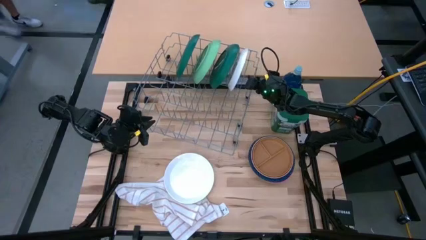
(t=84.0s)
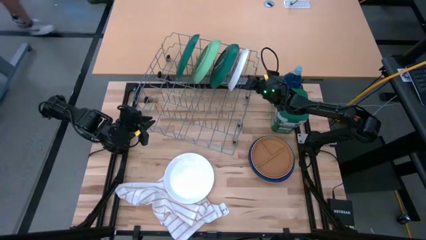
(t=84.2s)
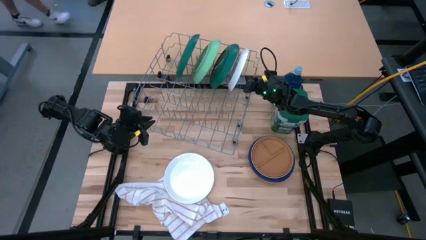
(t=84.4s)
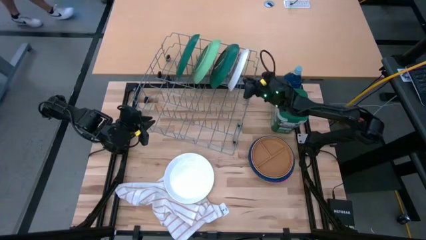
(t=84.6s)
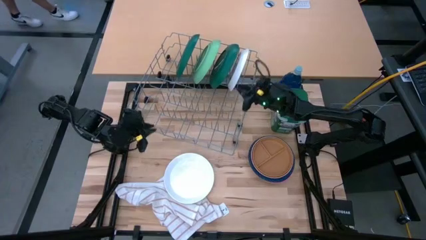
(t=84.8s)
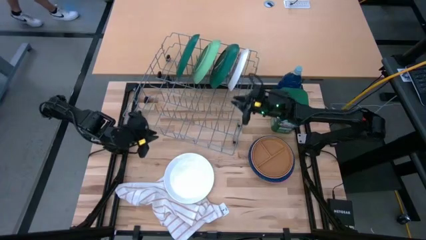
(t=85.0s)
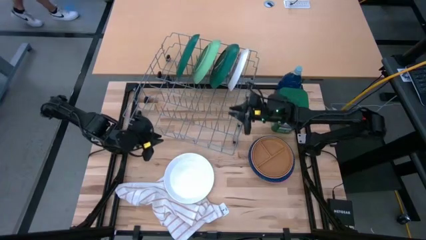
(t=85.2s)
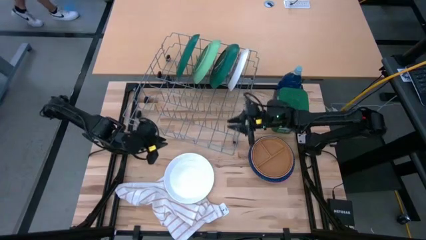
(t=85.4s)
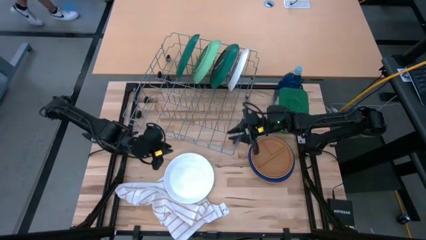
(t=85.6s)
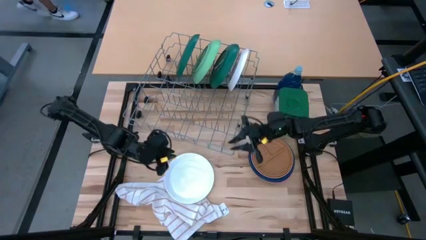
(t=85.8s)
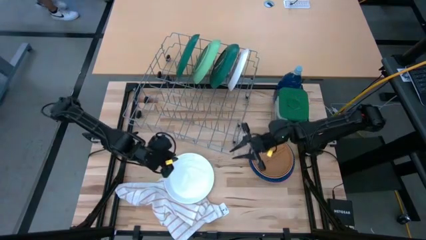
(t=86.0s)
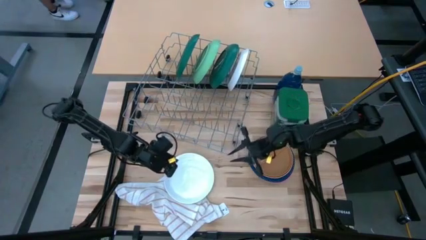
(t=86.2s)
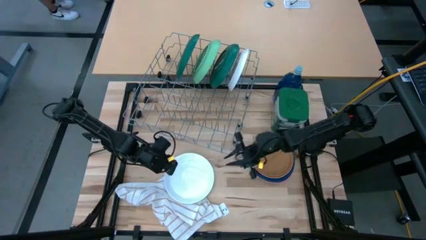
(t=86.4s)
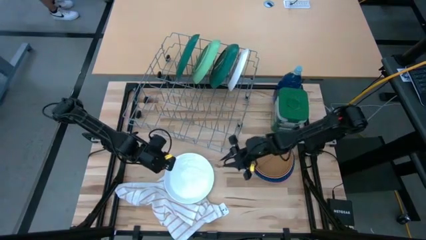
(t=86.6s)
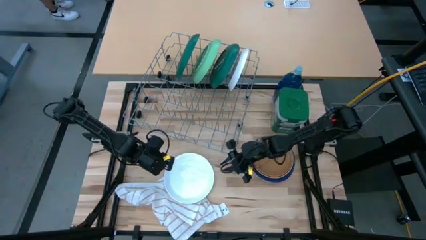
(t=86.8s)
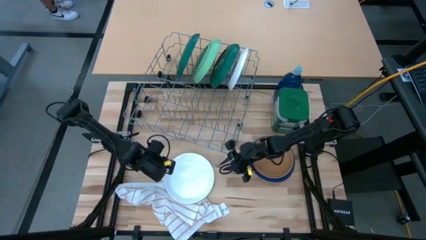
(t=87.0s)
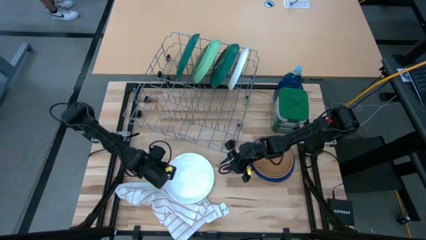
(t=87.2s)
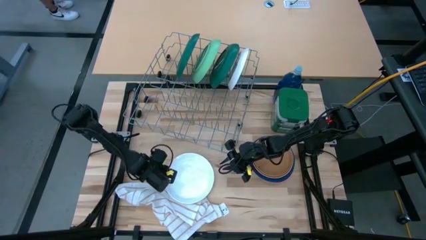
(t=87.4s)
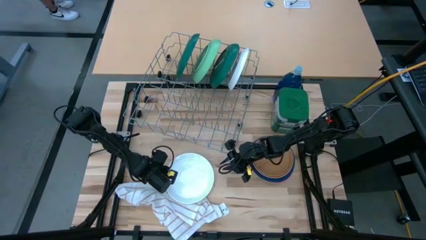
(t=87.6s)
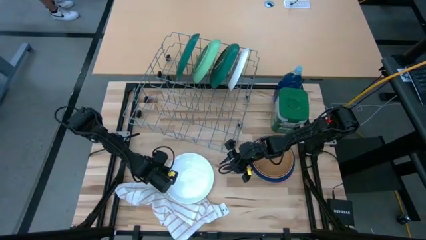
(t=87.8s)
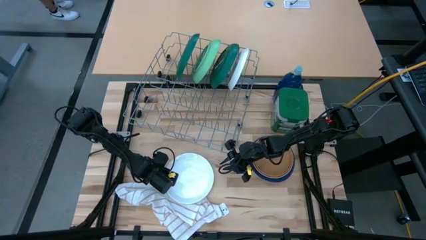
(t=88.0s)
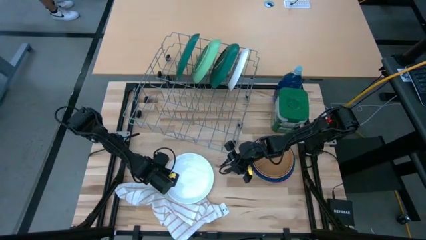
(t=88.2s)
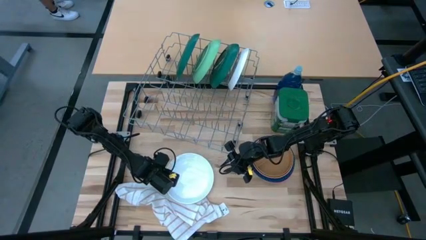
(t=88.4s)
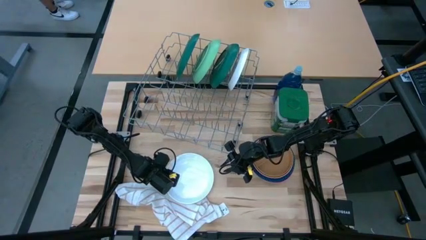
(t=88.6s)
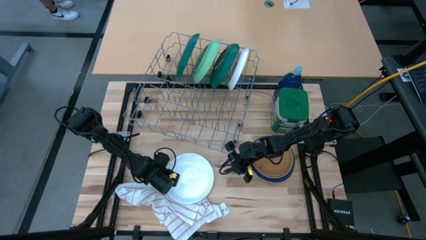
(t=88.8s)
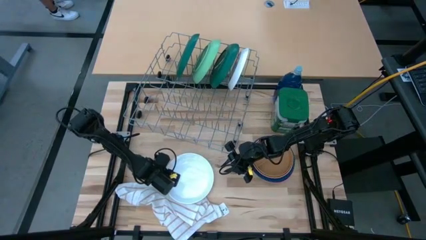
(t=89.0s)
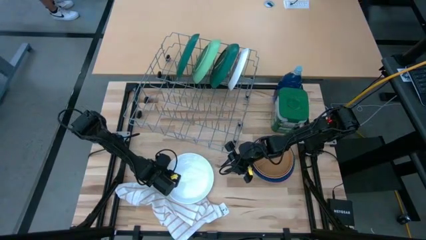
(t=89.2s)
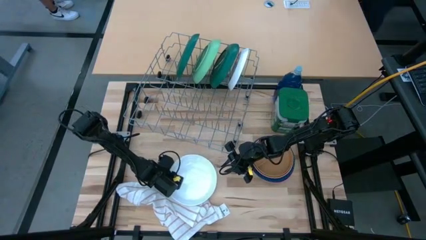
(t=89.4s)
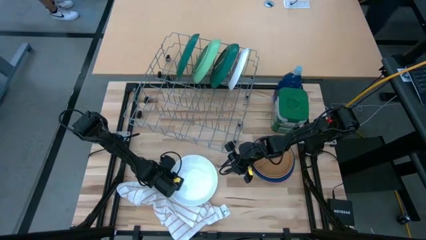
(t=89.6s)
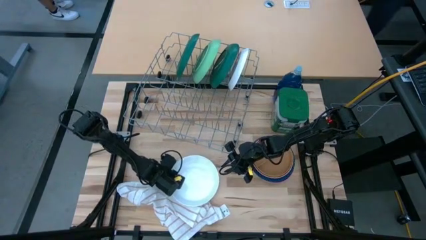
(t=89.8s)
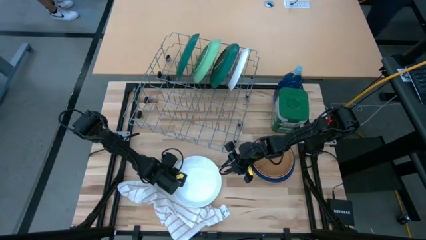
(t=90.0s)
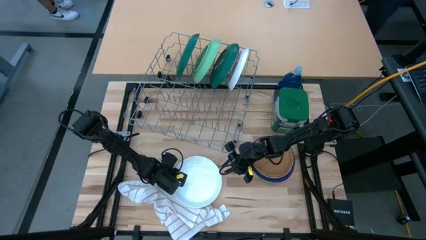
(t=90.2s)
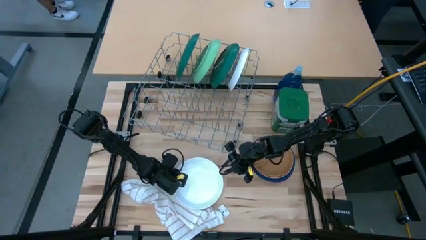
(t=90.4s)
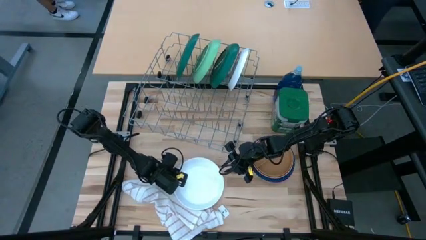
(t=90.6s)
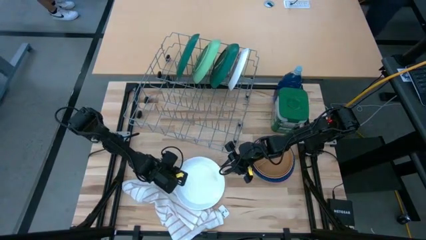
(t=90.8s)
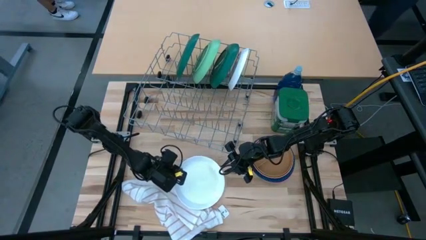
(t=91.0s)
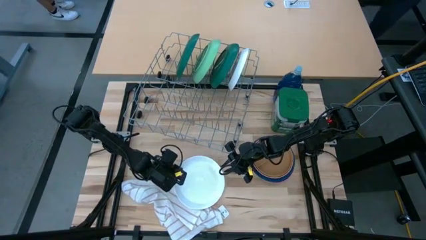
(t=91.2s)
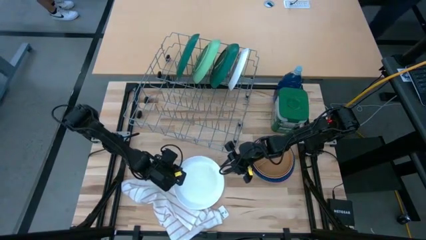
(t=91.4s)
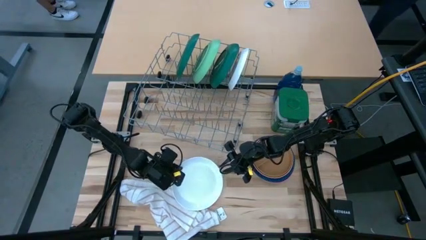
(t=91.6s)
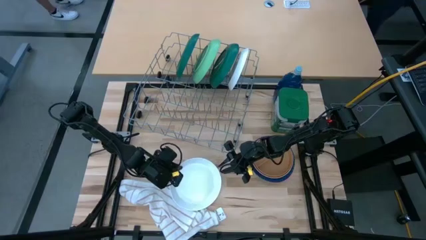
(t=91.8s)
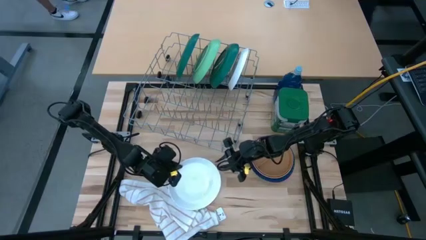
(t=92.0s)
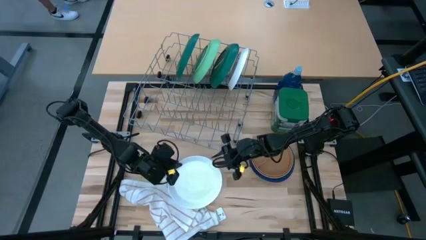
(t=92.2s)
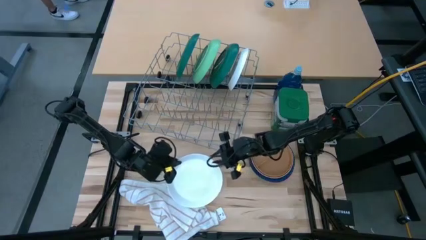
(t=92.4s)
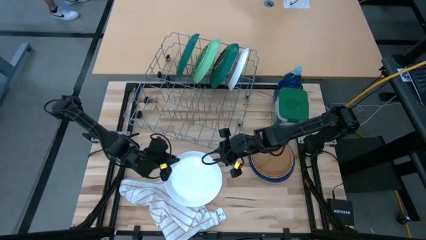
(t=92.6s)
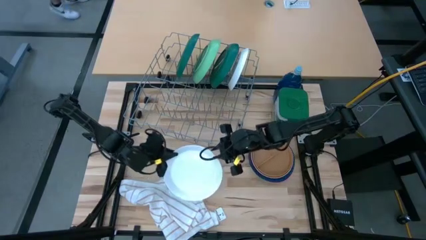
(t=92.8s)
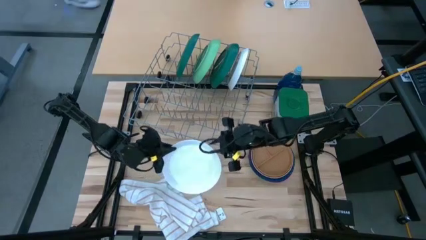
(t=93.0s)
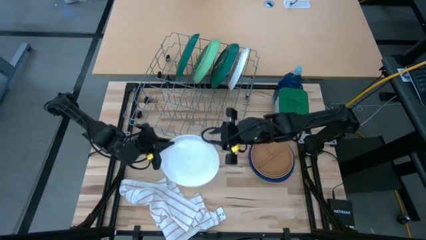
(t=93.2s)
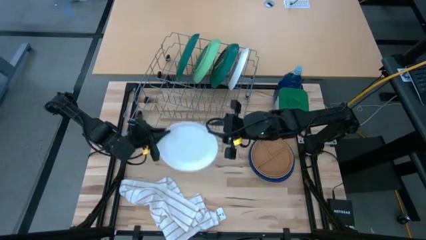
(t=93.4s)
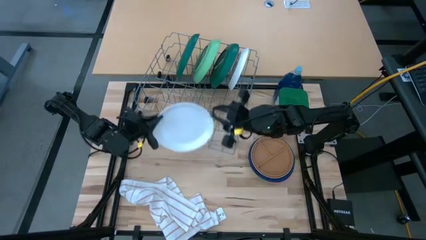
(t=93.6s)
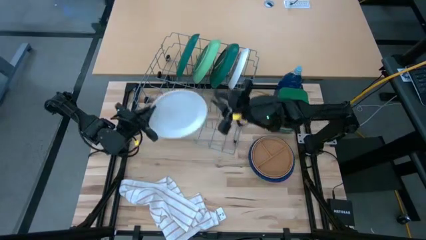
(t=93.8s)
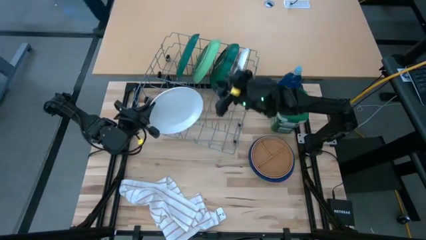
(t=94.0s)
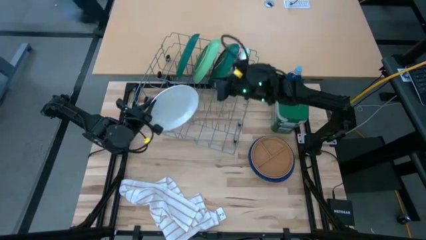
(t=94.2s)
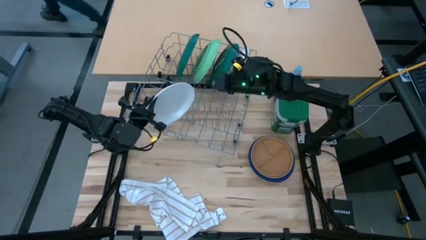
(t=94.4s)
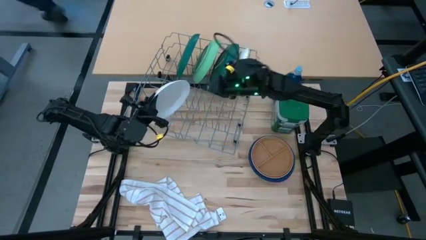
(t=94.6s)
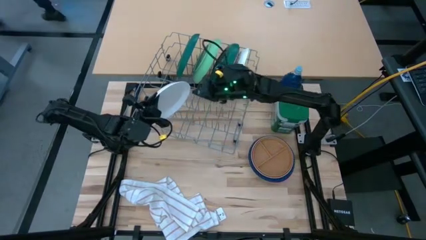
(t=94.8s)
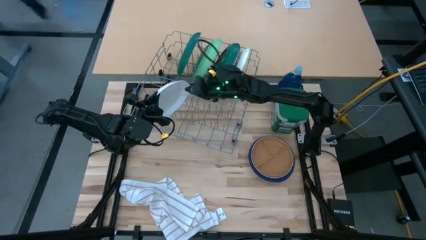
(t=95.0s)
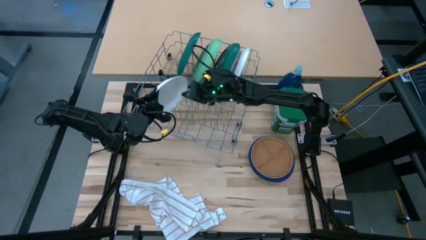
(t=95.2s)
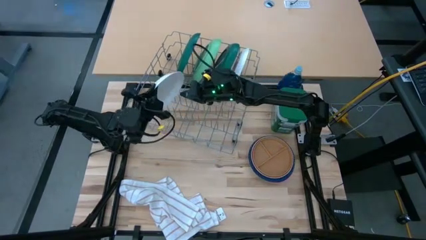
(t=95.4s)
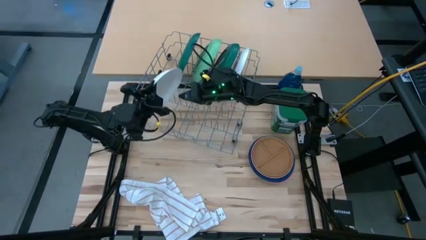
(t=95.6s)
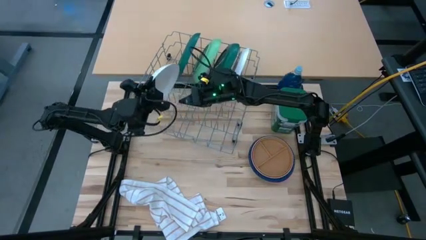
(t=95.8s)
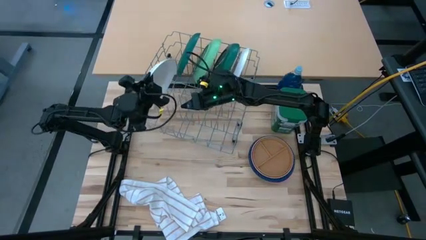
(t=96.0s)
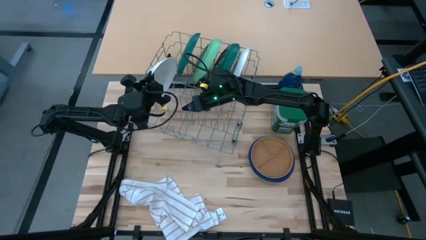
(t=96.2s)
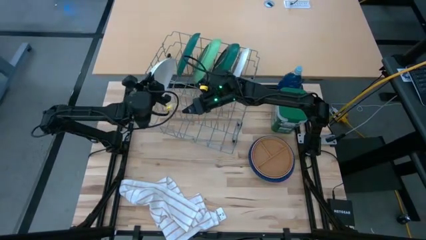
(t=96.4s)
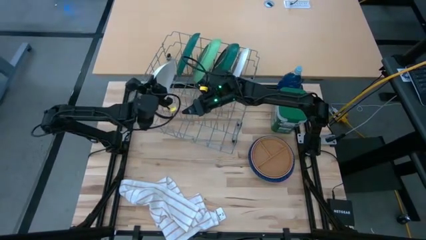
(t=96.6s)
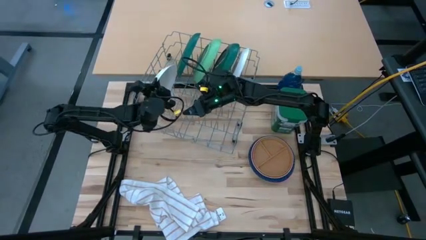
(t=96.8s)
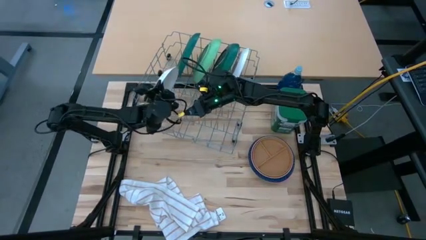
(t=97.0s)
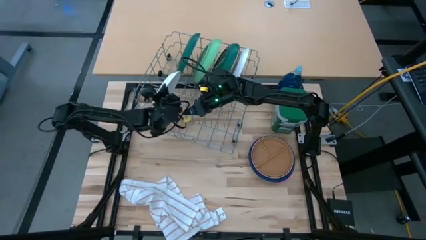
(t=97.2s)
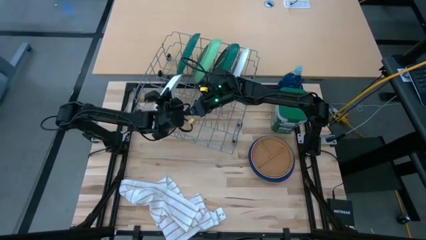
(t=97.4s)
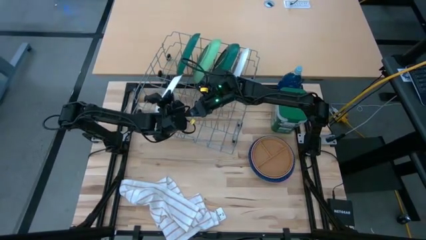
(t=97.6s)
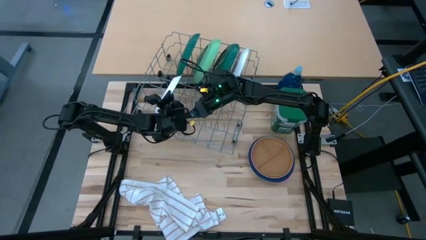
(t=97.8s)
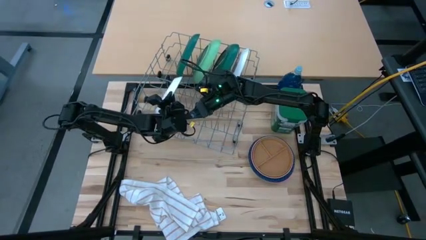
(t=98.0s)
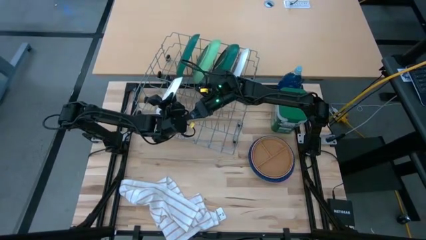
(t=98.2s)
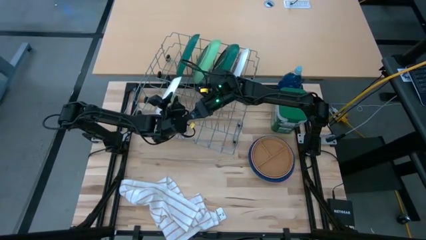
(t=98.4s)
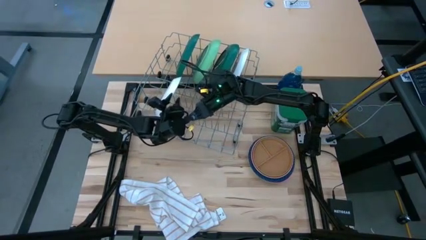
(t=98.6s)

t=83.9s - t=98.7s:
Task: Sort dishes
Put the white plate in the dish rack

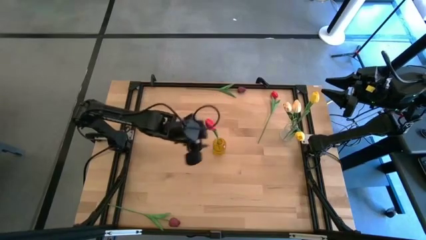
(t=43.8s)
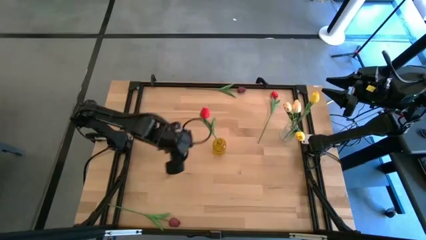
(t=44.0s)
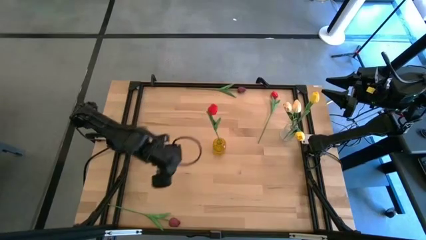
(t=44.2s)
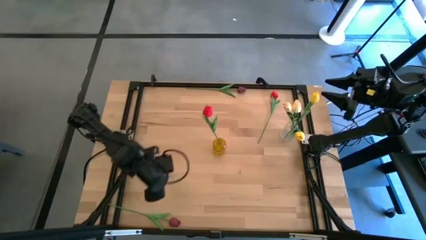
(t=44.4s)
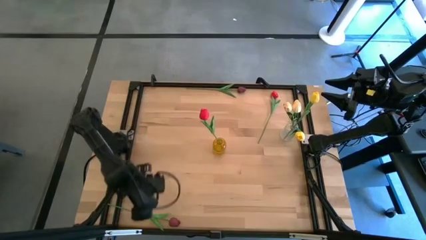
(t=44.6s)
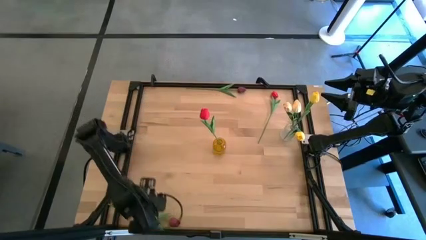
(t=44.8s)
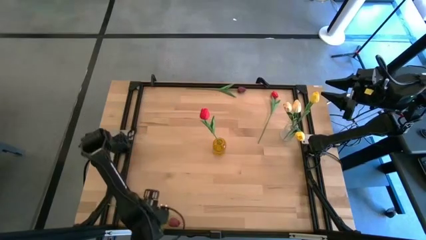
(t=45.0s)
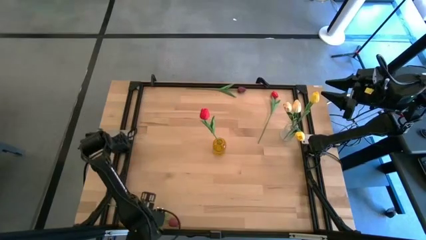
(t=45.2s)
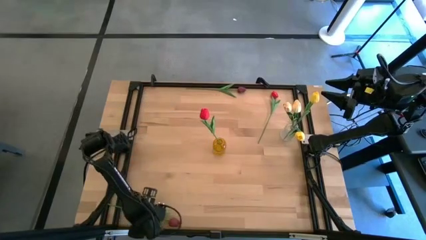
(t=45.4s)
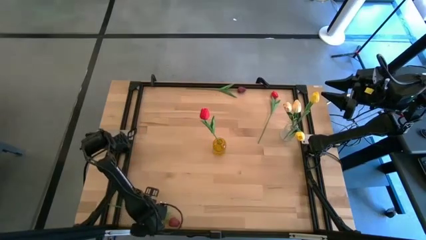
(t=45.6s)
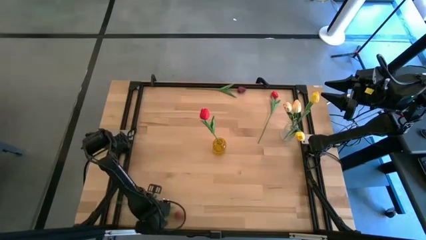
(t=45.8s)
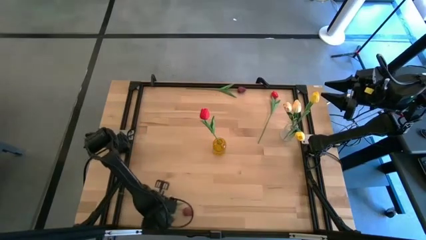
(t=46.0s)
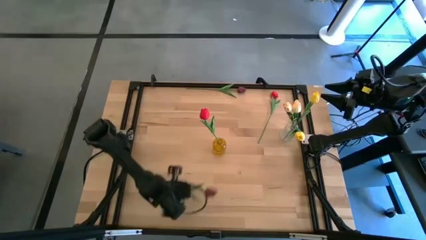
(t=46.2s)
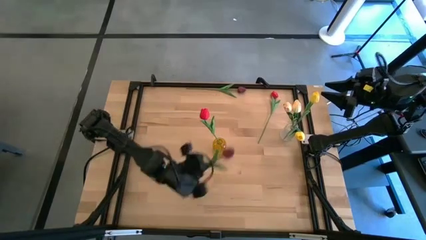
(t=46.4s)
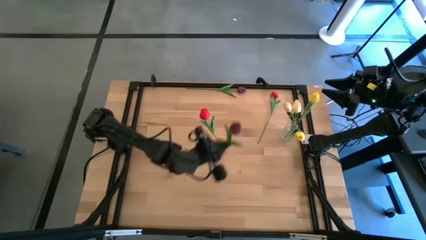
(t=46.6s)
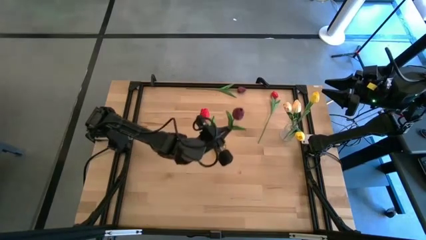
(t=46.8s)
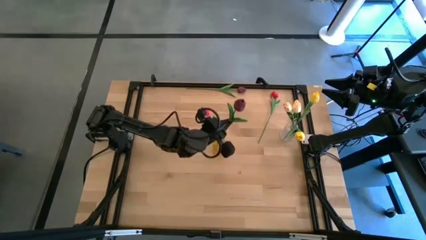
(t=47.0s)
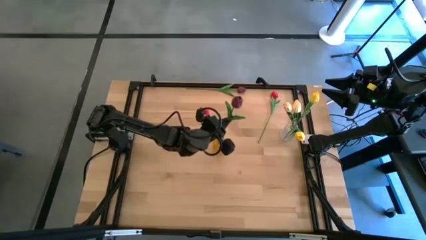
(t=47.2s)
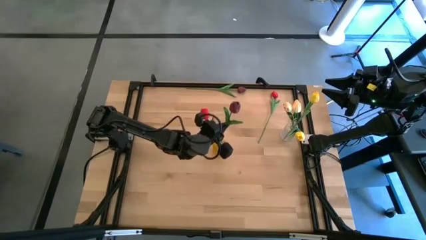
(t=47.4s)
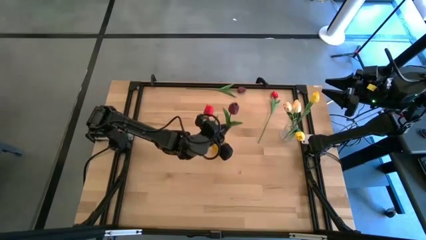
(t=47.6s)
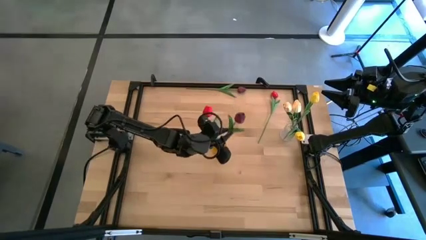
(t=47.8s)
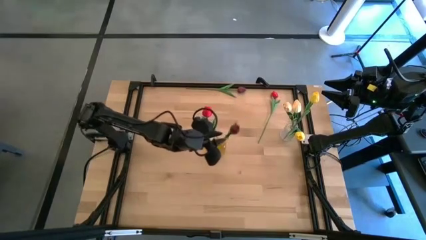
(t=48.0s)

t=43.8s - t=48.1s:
Task: Sort flowers into vase by color
Put the bottom dark red tulip into the yellow transparent vase
